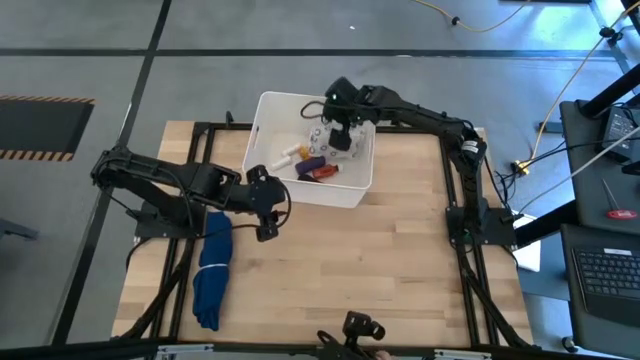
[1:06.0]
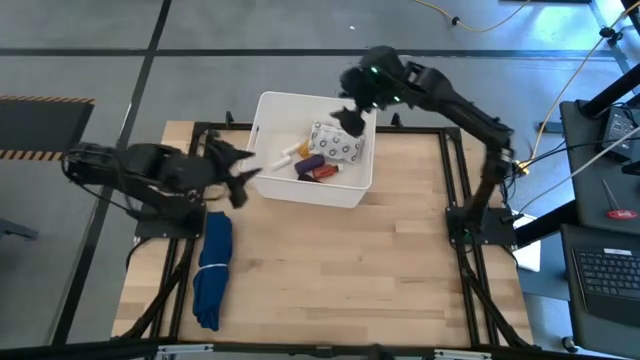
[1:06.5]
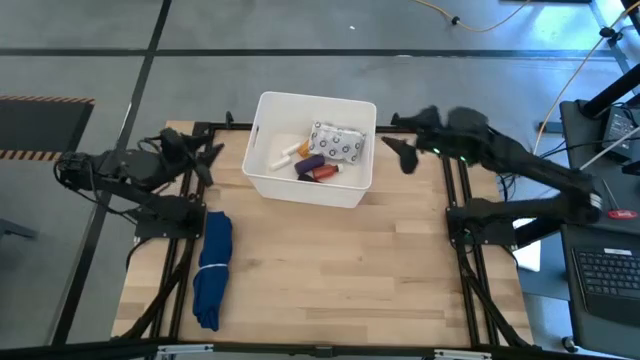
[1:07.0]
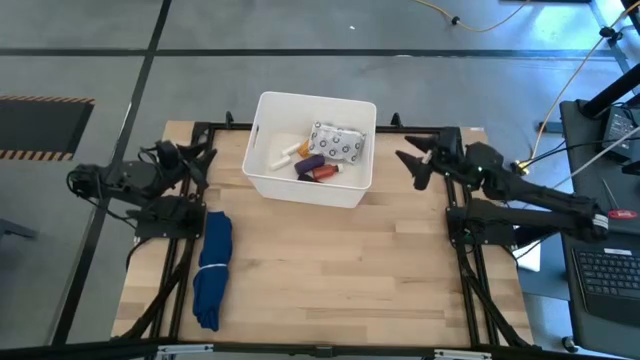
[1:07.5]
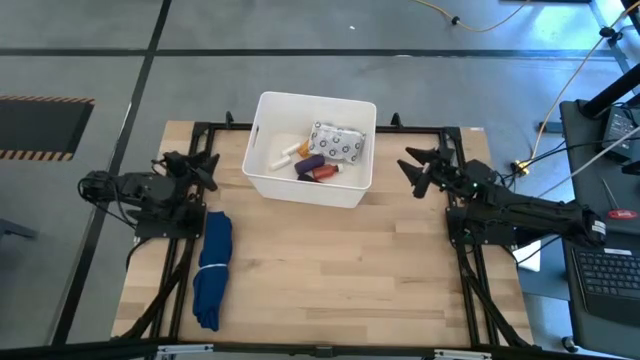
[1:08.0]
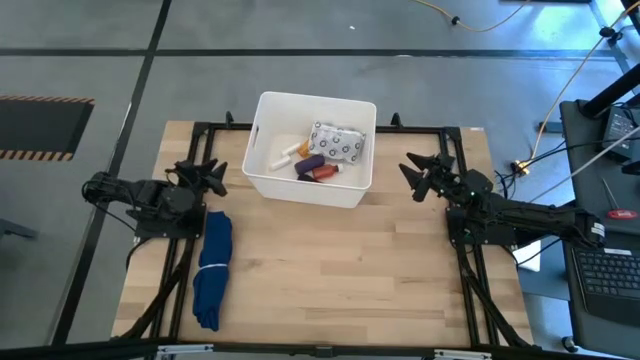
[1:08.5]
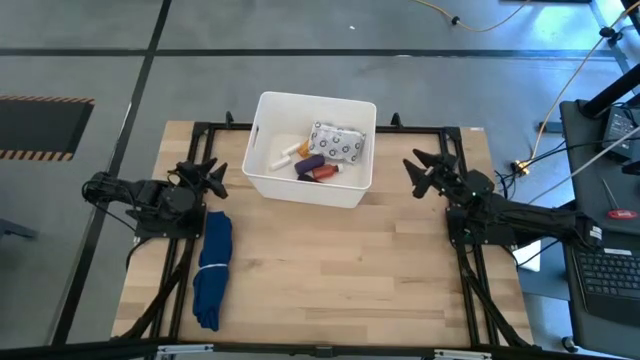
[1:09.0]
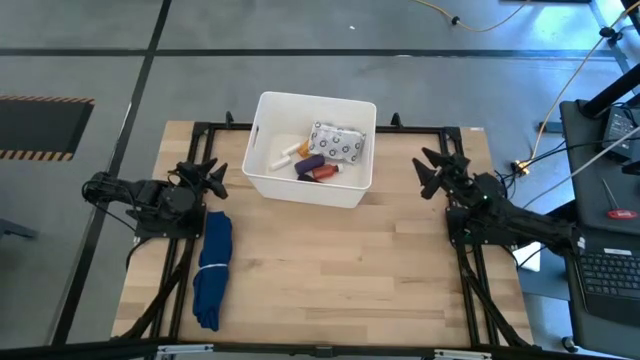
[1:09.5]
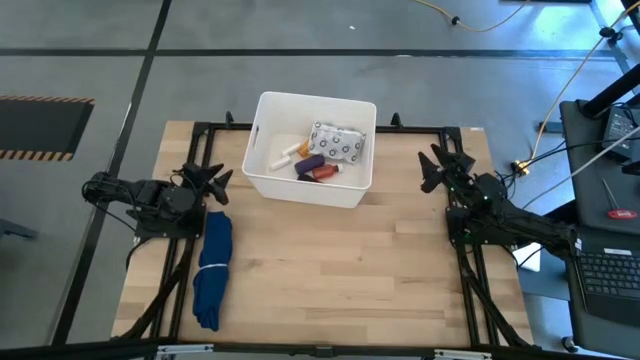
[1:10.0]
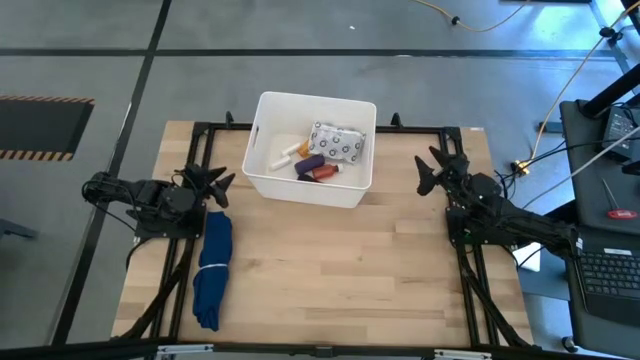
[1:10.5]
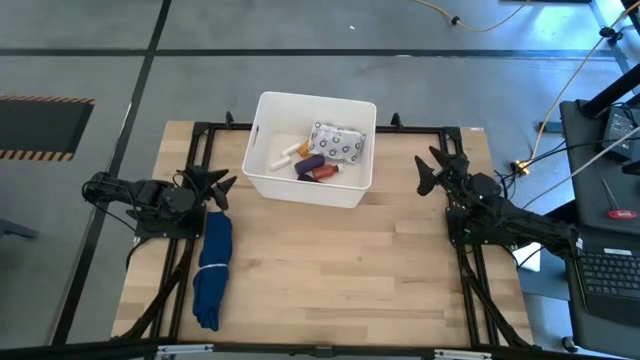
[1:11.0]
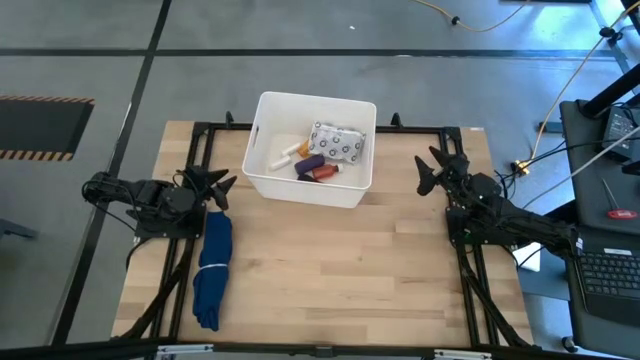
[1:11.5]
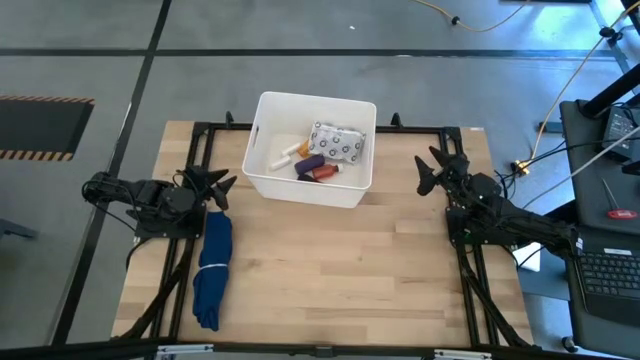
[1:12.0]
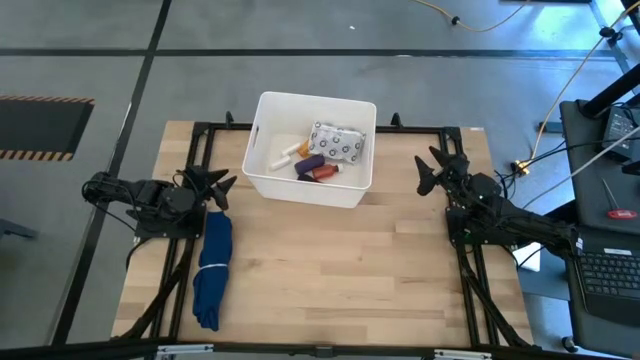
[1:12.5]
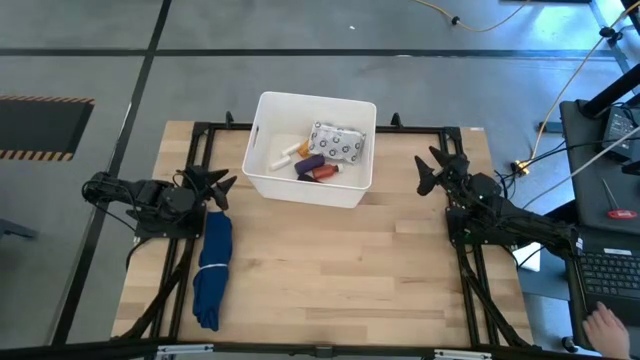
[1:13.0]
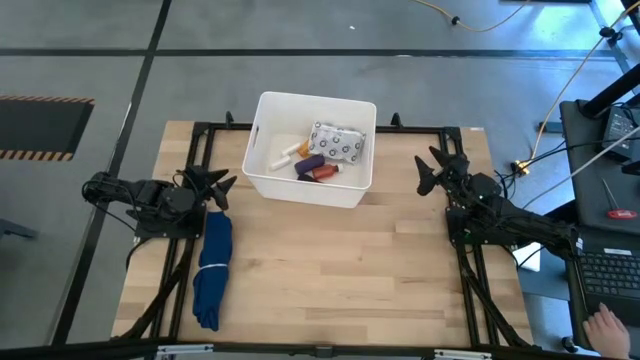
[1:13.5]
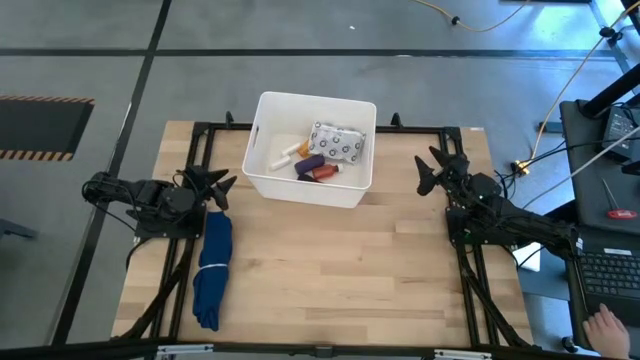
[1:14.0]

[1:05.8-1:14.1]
Task: Pick & place medical supplies in basket/bin
Return to Home Position

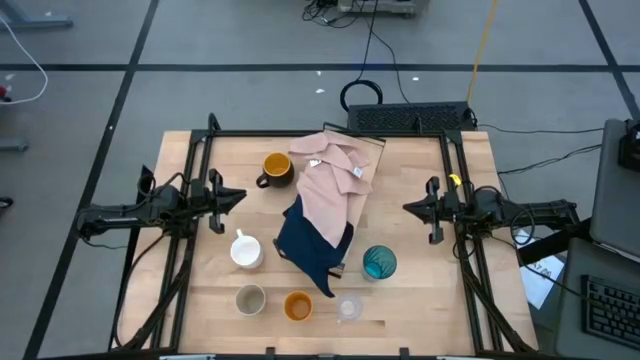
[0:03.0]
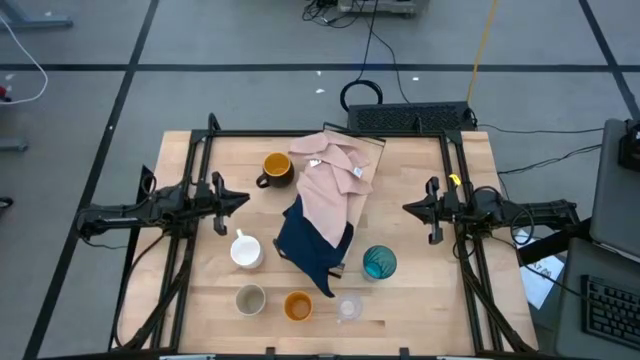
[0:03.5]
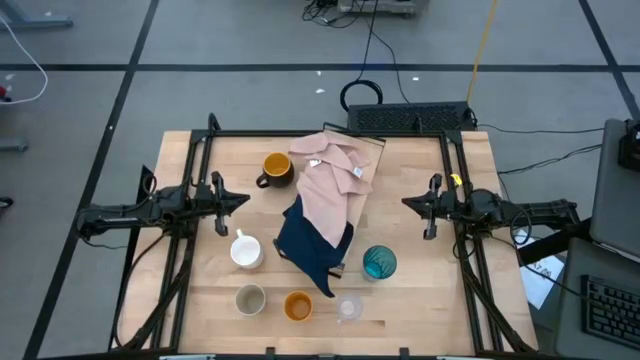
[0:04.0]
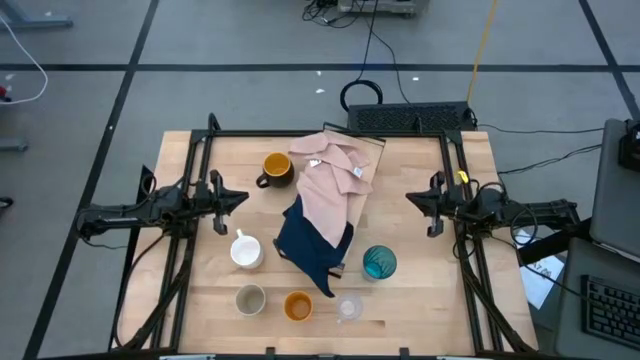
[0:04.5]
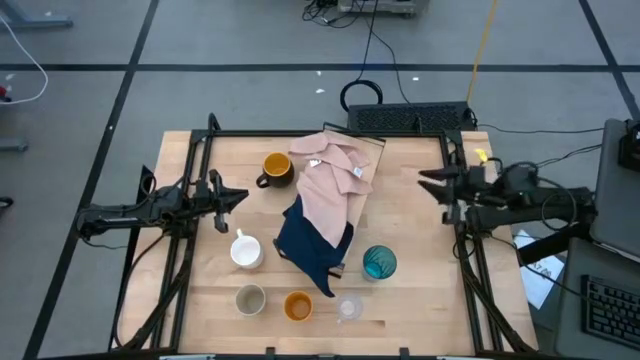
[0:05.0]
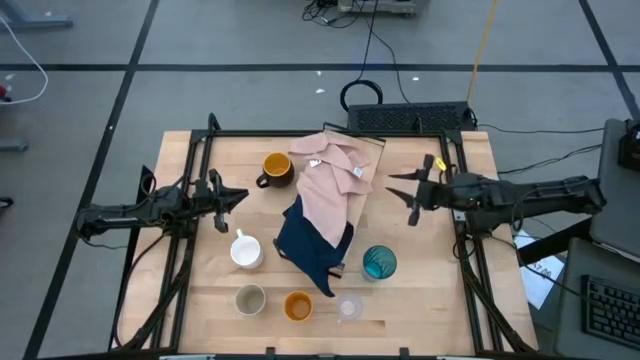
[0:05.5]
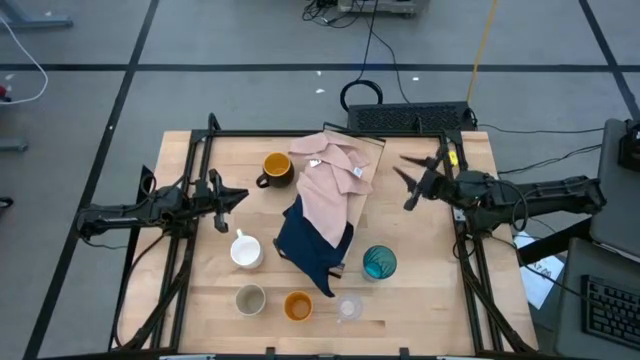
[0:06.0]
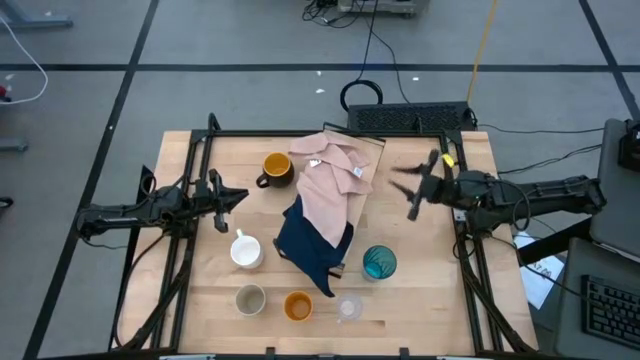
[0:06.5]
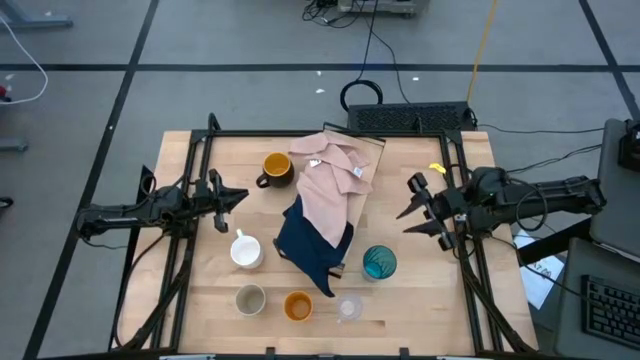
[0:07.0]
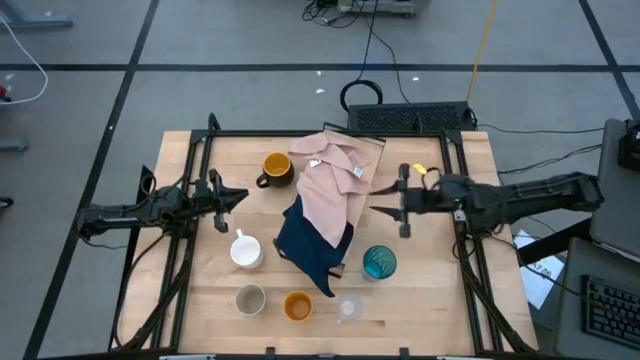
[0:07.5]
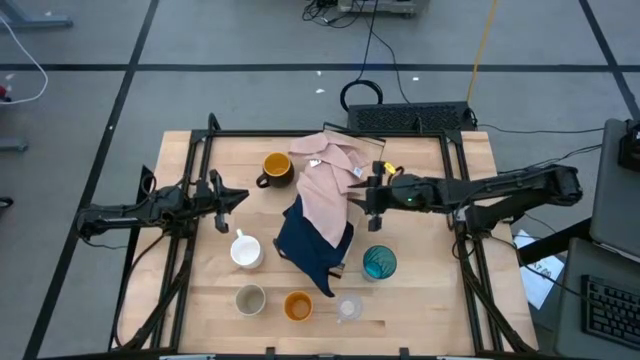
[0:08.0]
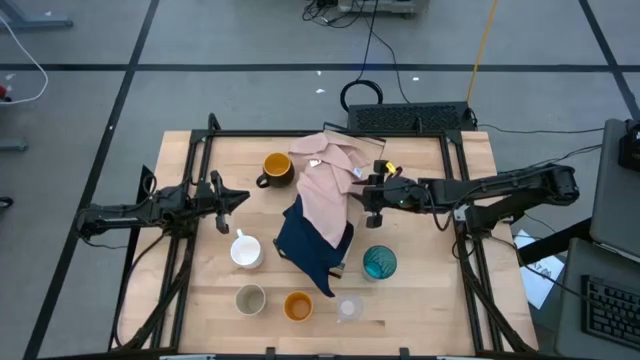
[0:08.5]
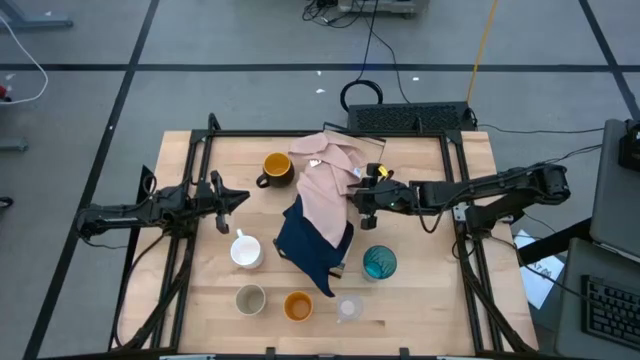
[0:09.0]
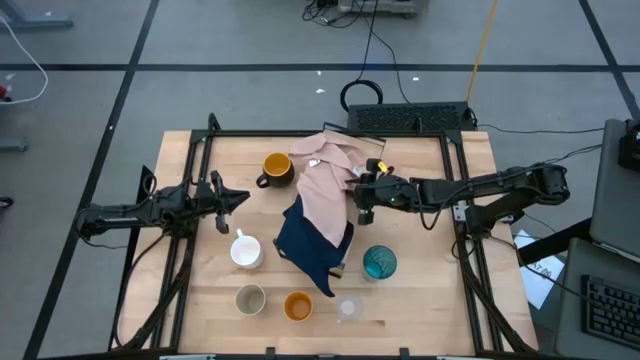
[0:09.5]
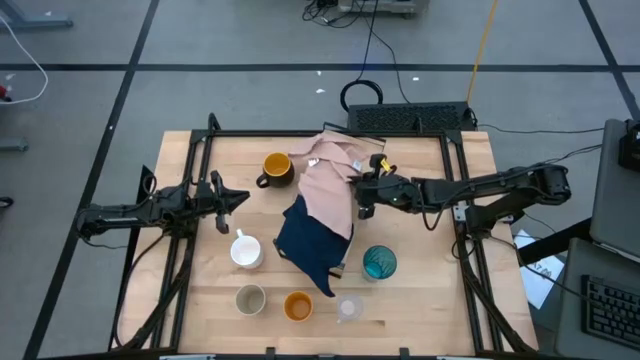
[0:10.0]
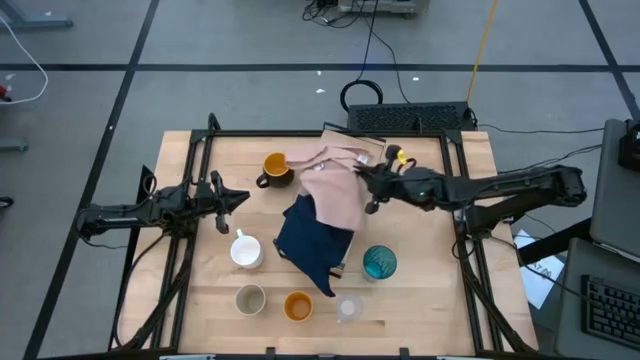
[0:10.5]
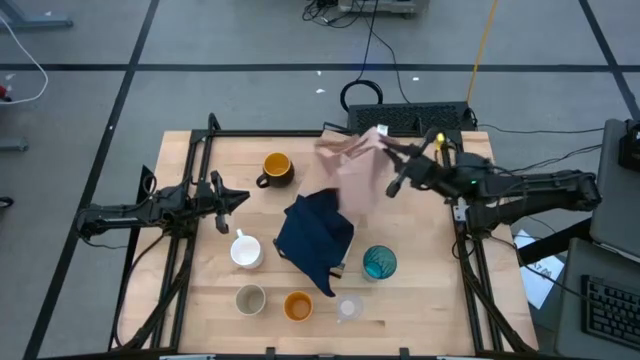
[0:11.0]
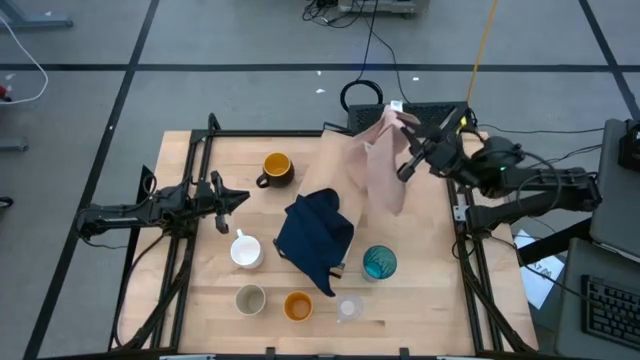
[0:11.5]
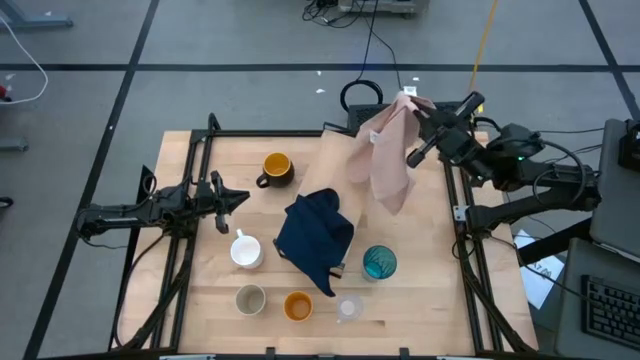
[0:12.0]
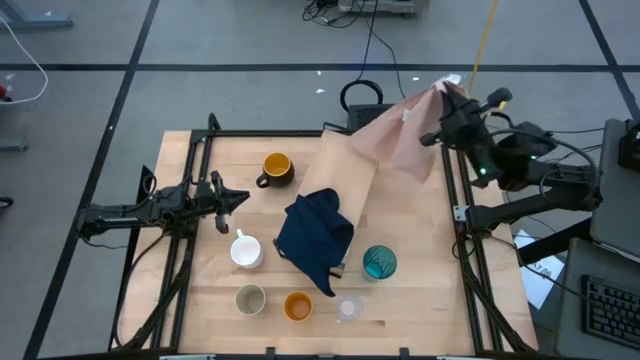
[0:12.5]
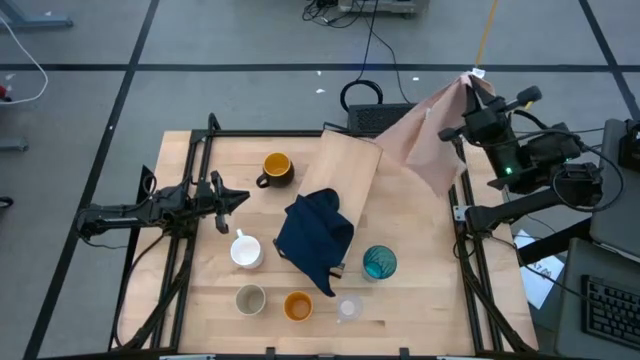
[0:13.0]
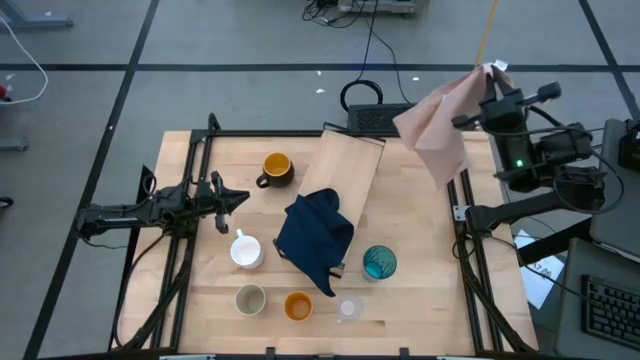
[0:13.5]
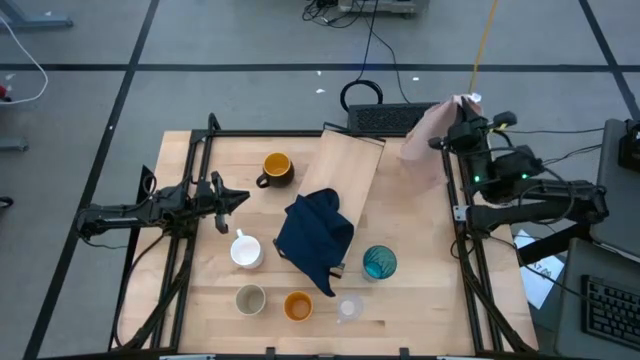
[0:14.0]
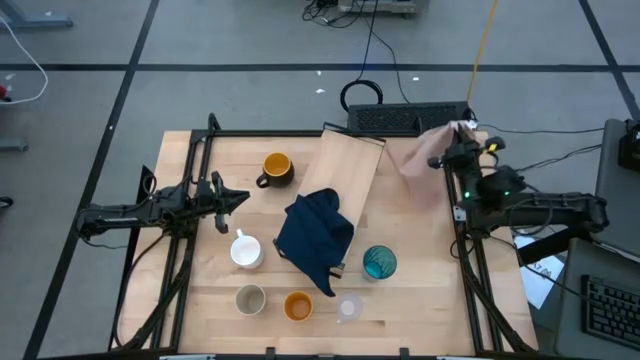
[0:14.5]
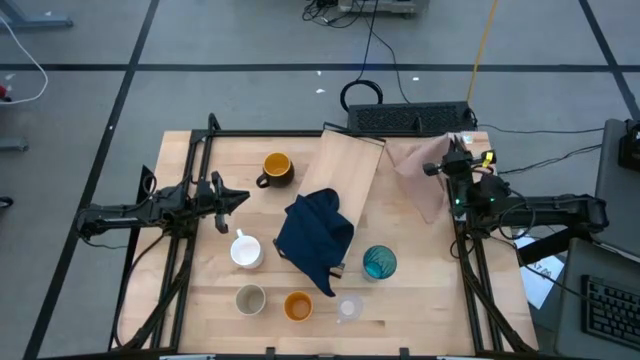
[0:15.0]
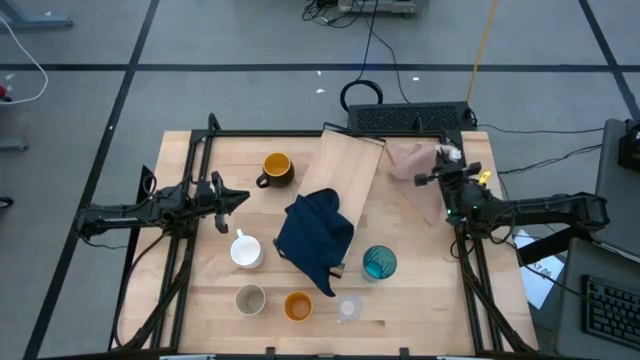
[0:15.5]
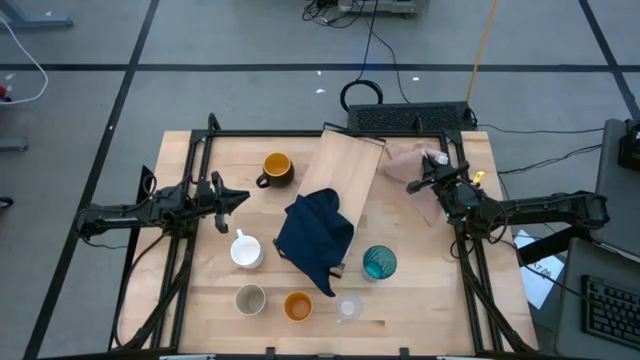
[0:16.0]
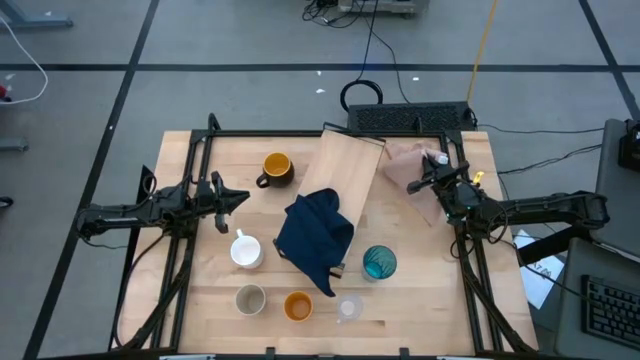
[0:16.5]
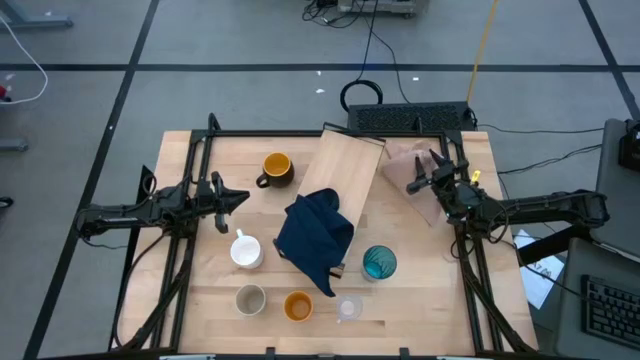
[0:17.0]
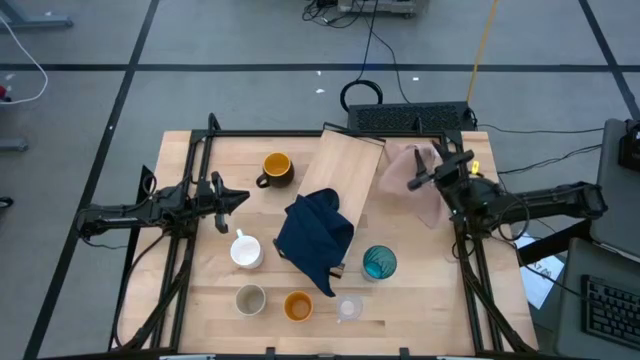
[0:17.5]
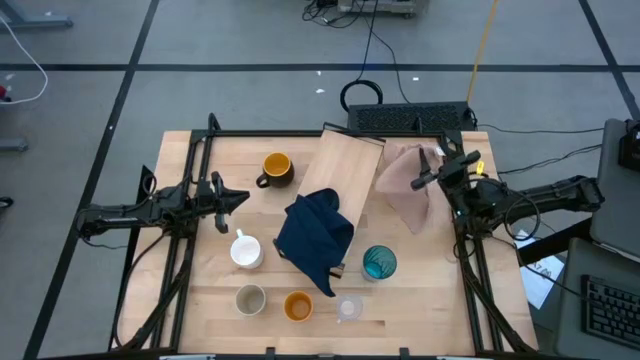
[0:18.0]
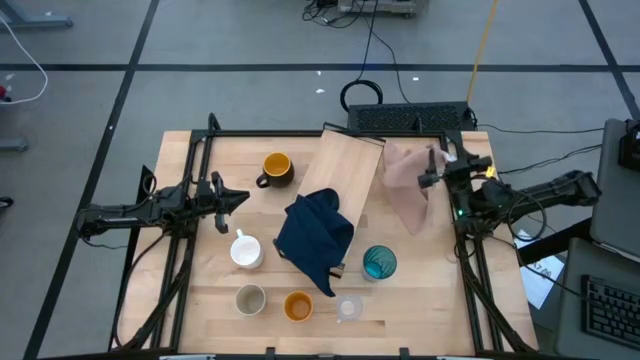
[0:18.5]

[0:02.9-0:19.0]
Task: Stack small to large cups/mugs on shelf
Remove the brown table napkin from the shelf
